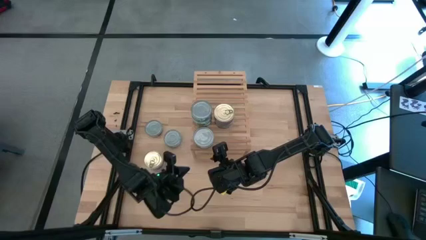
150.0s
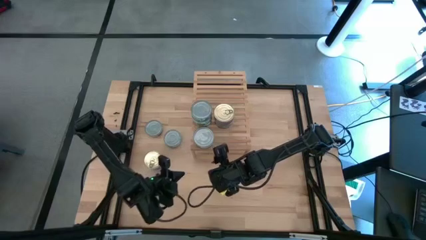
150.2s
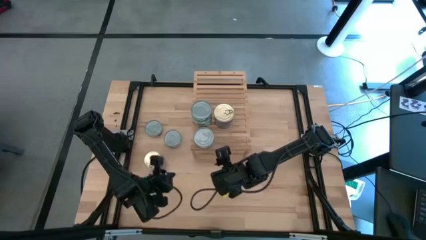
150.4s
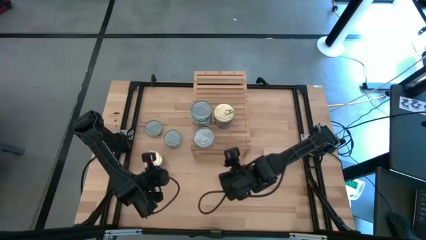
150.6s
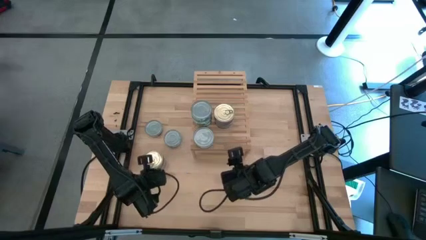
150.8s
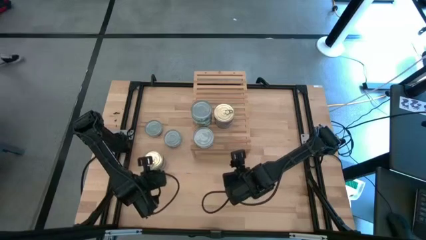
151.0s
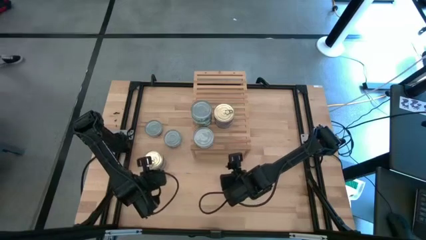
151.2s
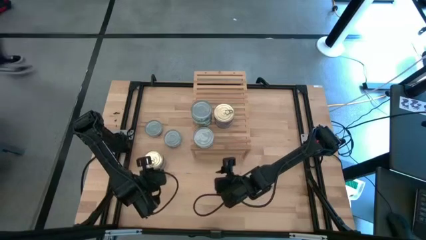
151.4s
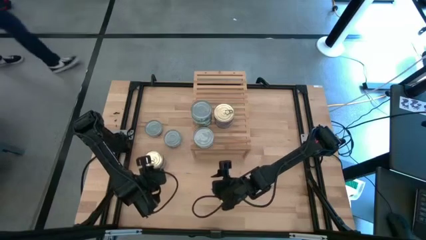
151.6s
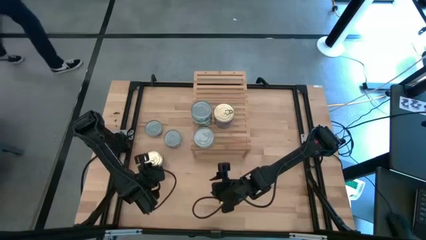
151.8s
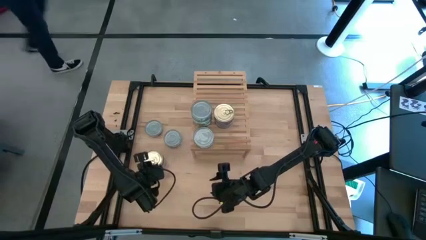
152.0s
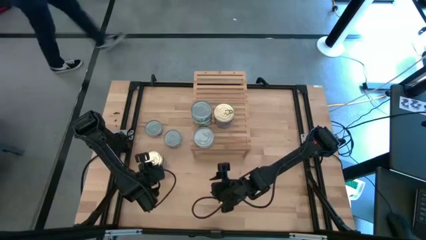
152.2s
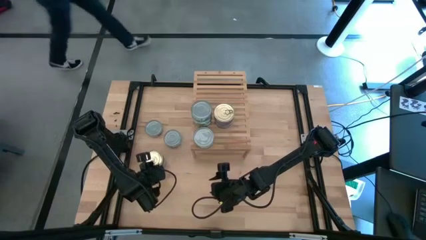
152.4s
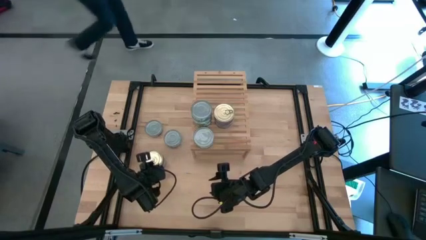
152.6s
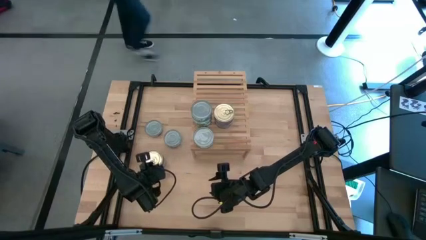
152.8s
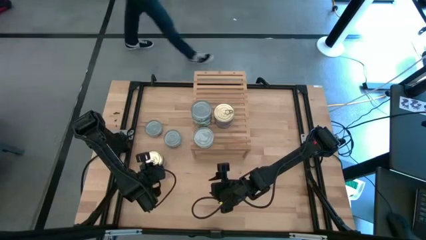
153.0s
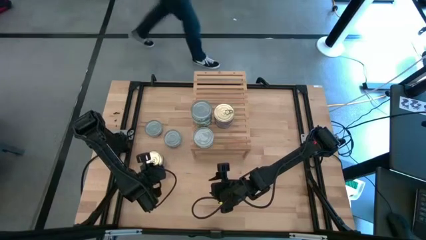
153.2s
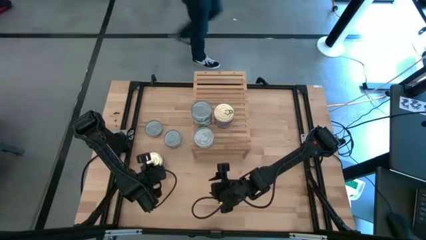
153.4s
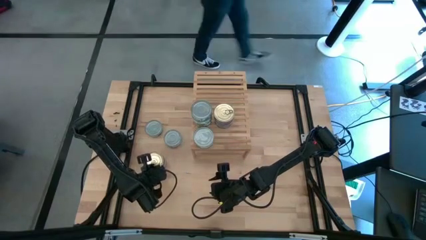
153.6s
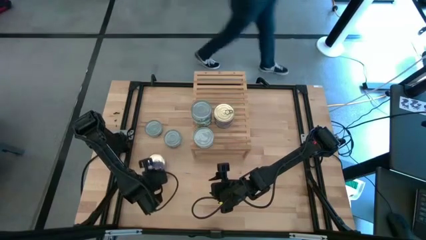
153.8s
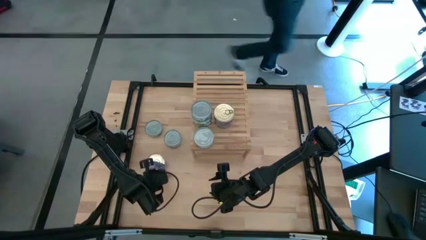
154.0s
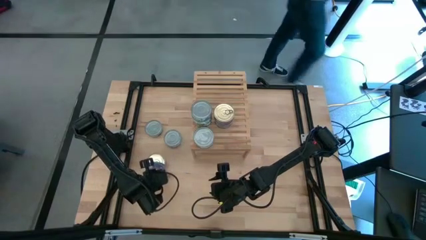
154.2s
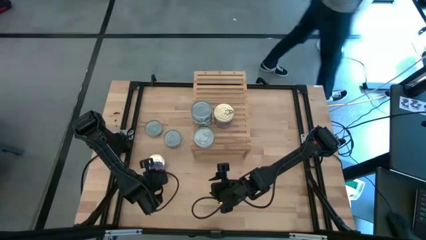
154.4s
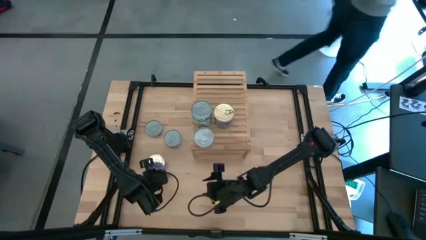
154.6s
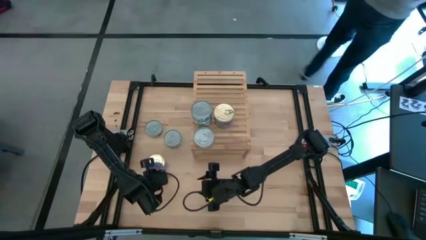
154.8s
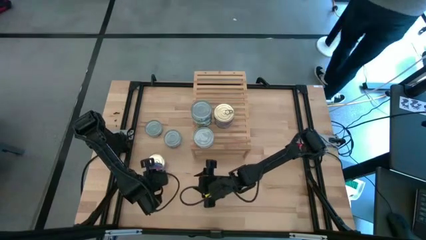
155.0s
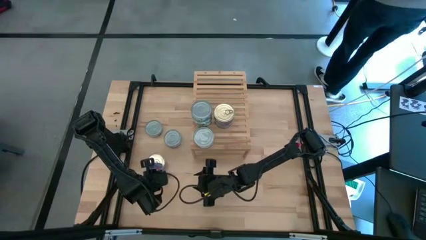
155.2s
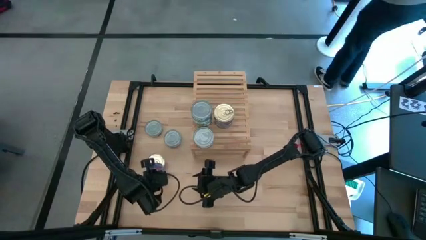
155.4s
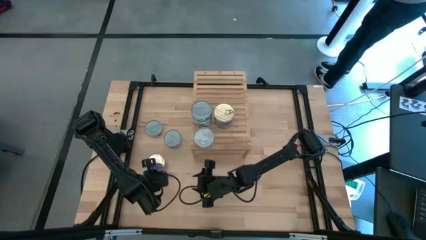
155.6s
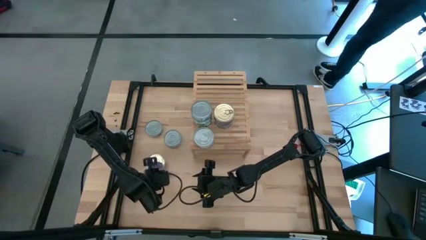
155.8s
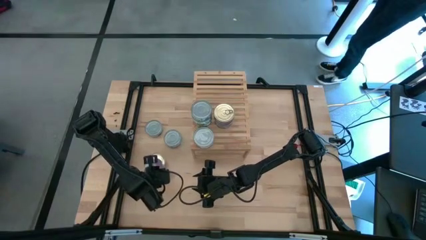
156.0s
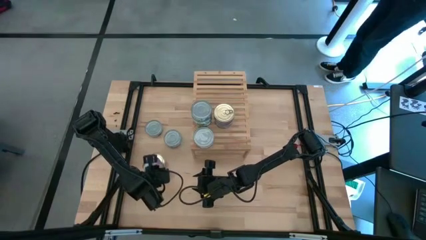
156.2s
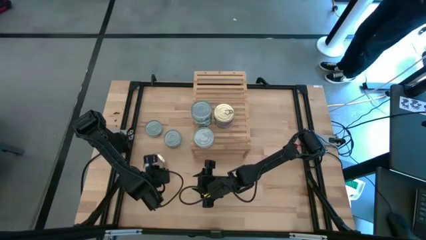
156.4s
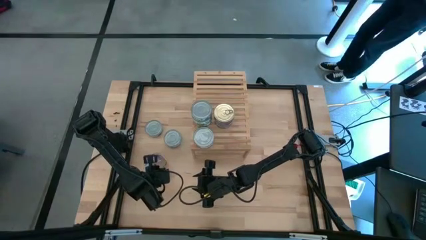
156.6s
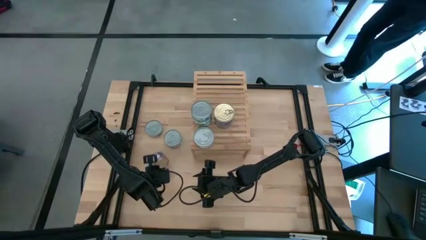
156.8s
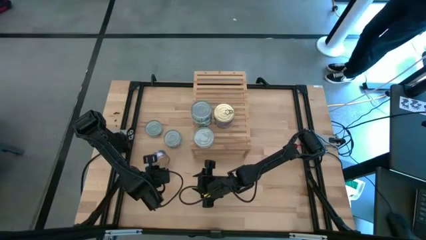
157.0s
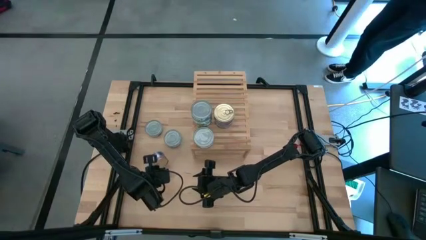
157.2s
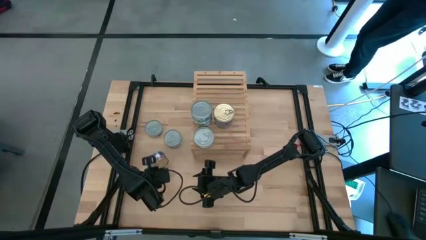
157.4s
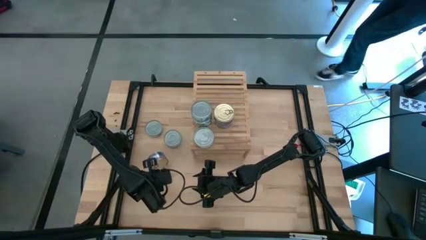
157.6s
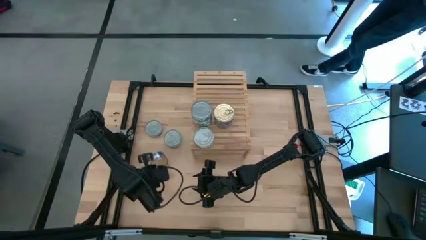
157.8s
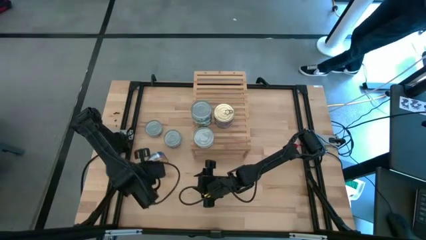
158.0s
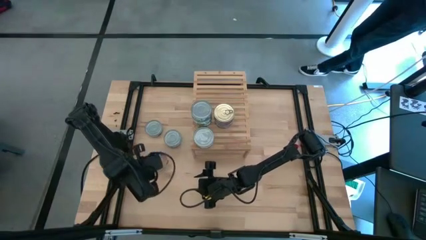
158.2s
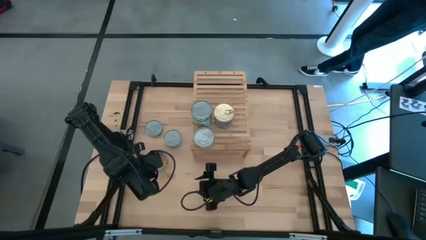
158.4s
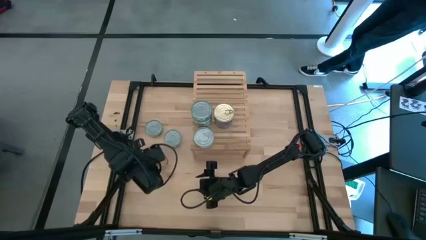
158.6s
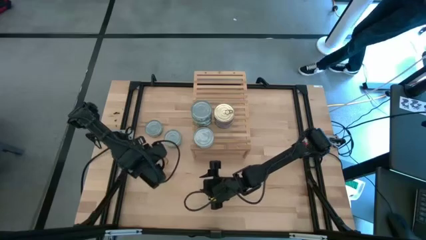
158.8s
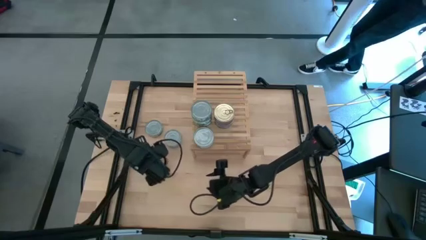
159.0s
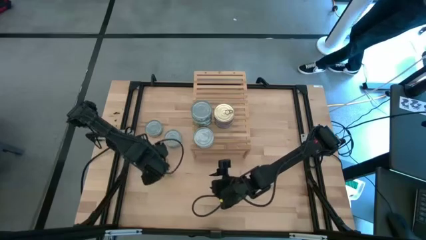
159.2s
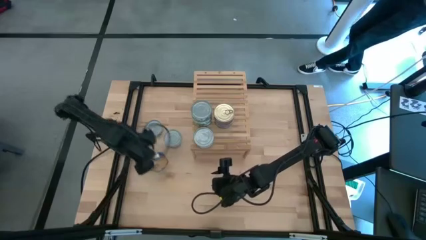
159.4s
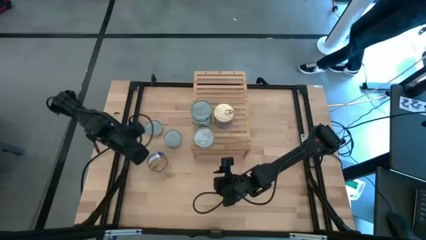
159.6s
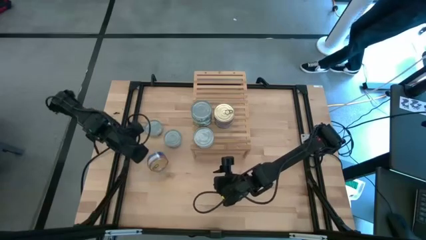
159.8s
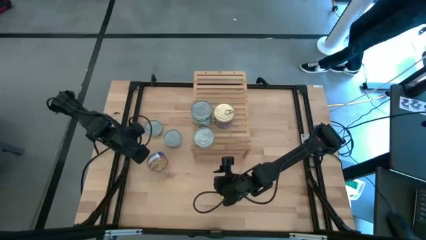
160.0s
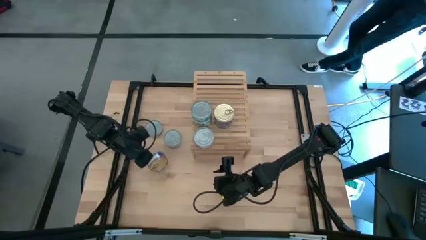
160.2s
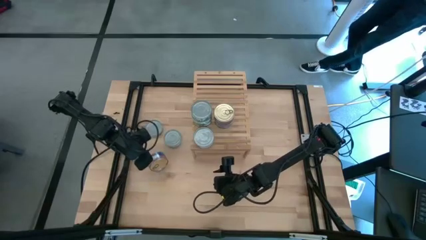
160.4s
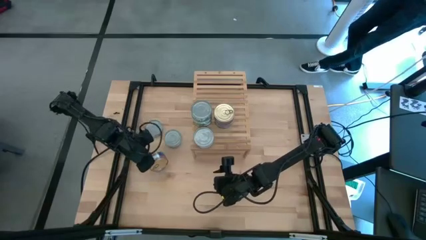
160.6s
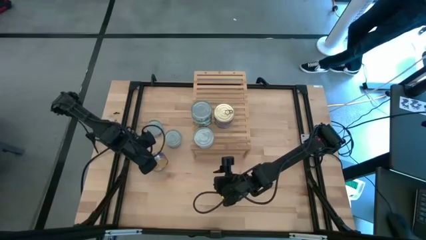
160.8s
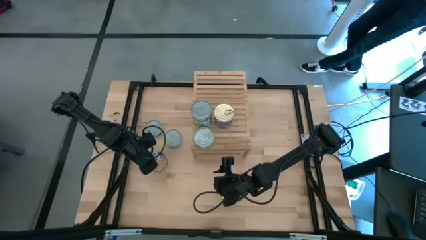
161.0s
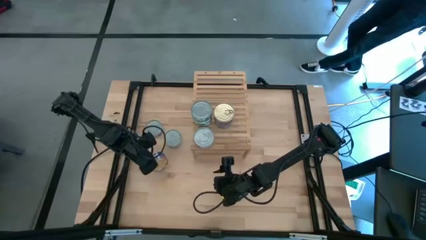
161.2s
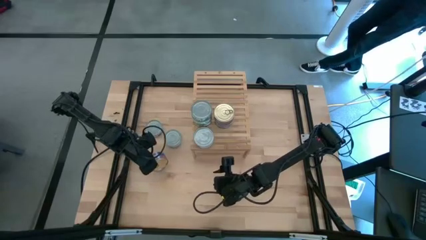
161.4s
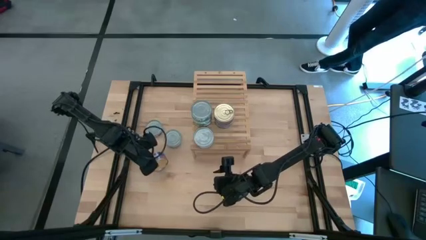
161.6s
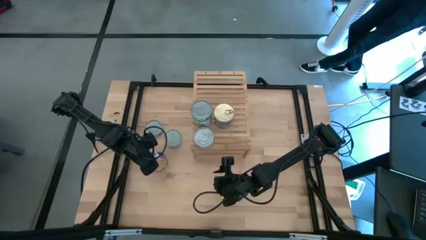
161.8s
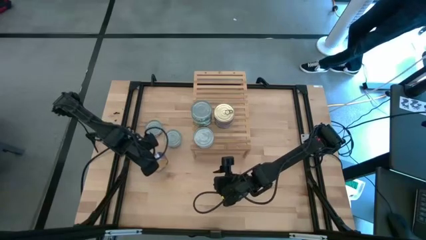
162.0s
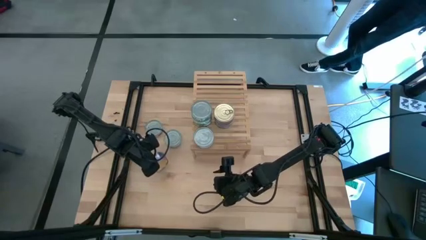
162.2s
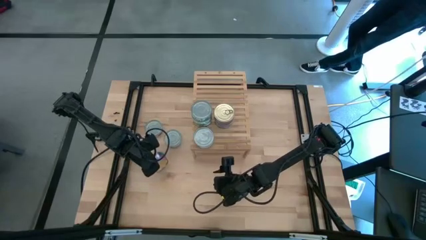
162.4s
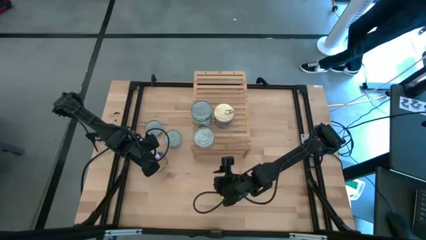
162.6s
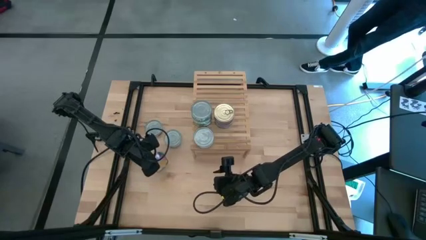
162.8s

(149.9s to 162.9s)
Task: Stack canned seafood by type on shelf
Put the blue tuna can on the shelf

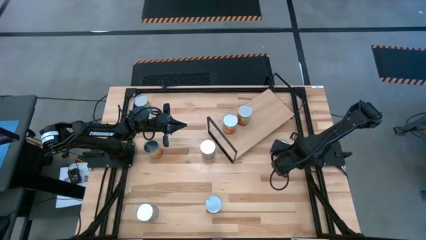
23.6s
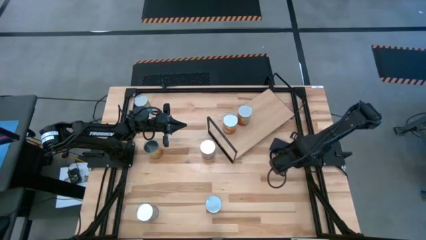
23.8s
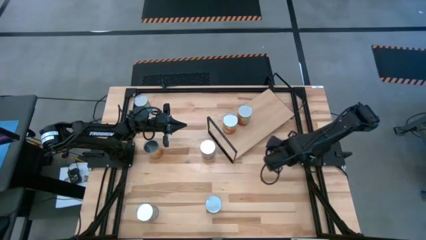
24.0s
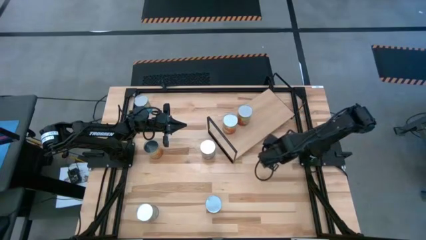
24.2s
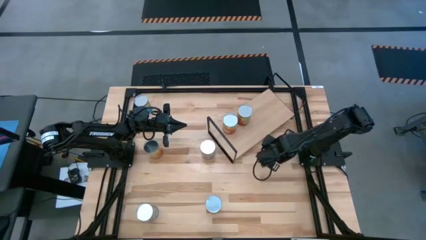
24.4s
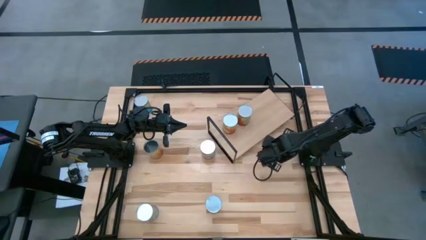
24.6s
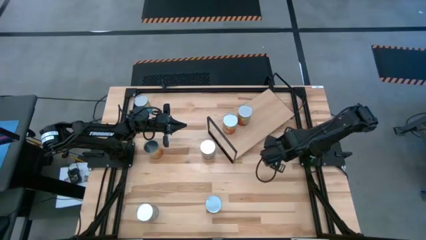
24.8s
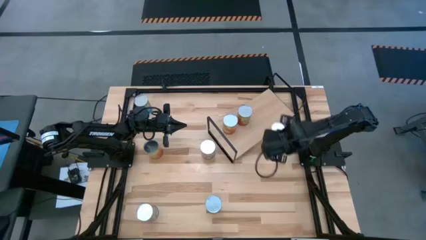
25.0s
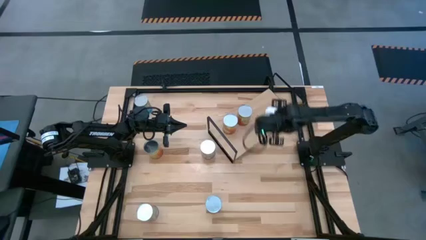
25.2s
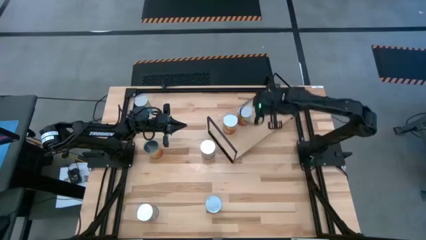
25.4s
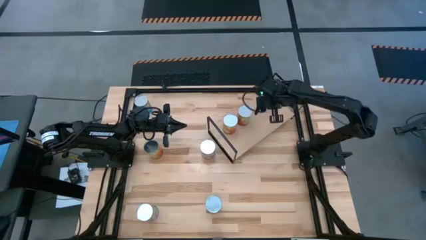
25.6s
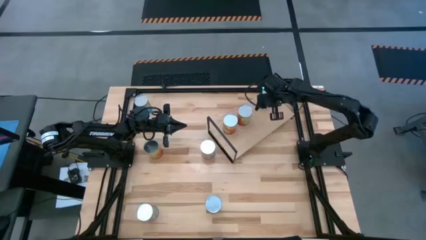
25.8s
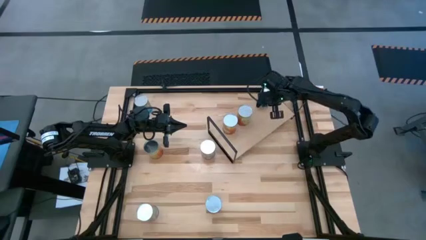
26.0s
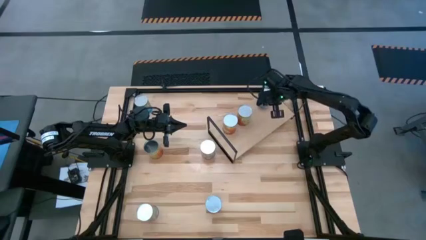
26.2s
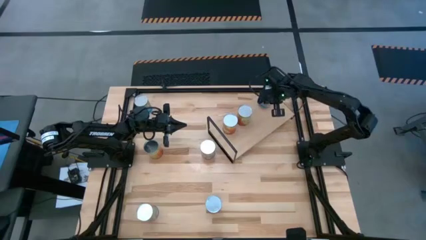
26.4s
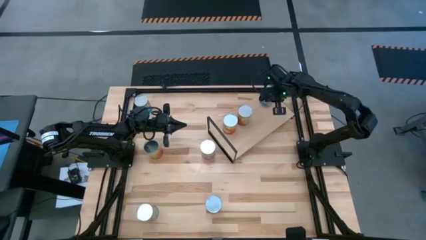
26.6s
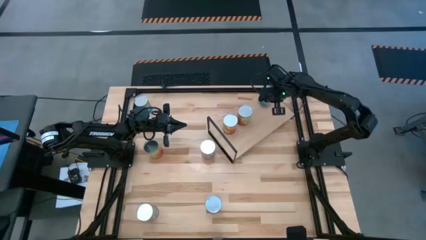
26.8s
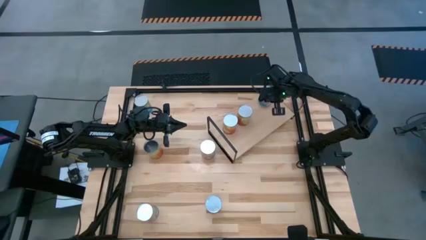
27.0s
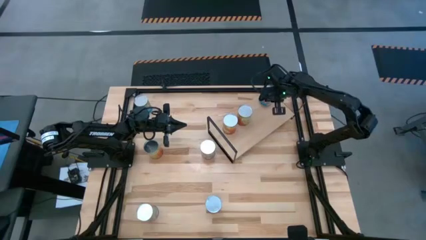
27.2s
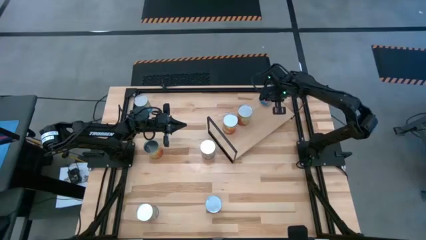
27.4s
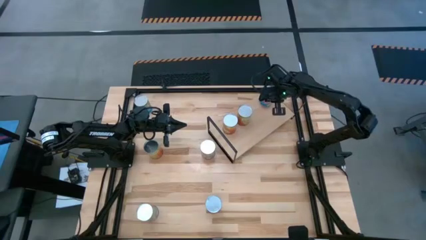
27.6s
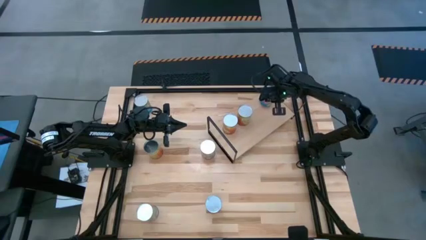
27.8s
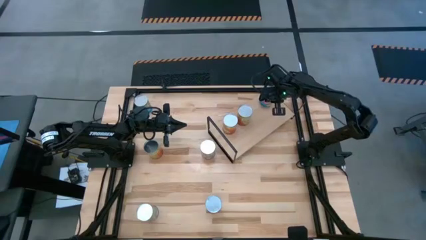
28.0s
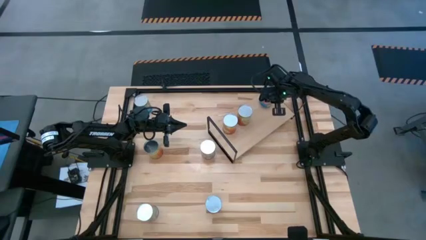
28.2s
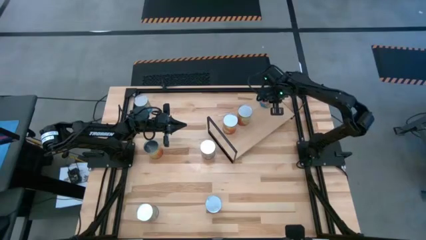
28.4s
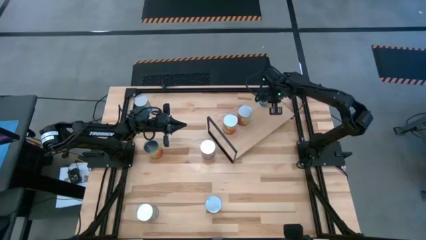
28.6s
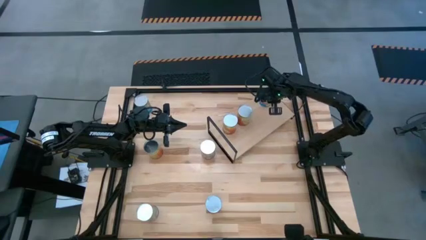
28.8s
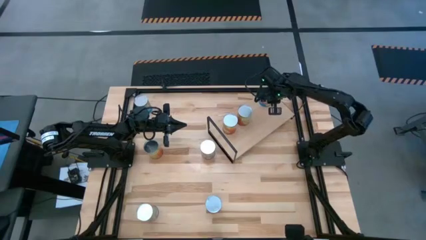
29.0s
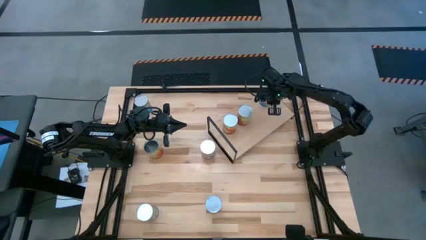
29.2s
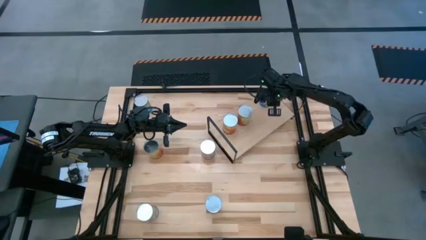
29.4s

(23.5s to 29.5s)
Task: Pick and place cans onto a shelf
Put the bottom canned tomatoes on the shelf
